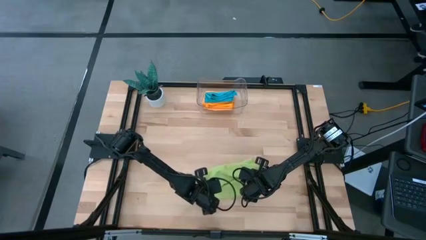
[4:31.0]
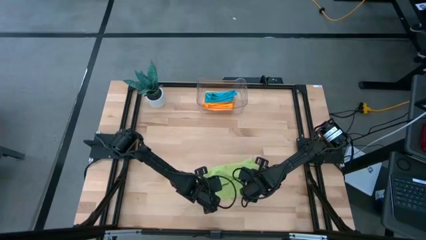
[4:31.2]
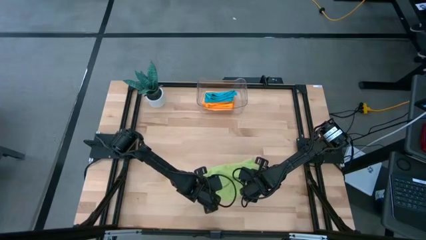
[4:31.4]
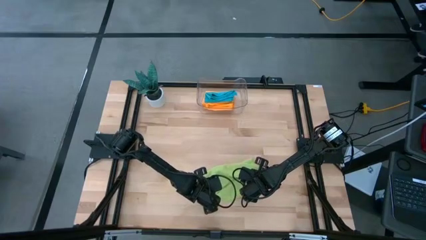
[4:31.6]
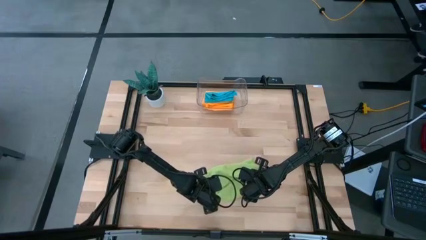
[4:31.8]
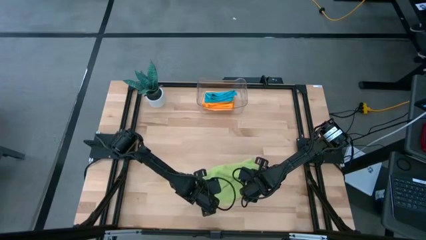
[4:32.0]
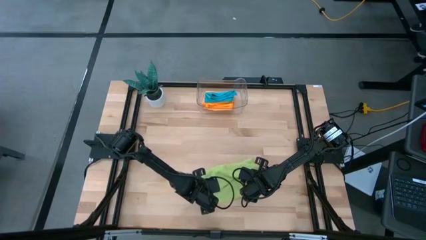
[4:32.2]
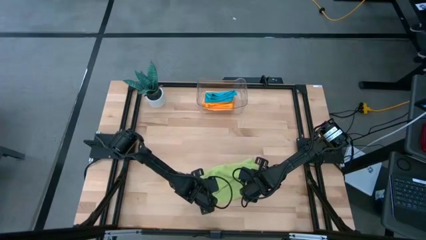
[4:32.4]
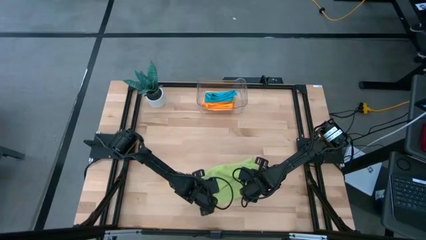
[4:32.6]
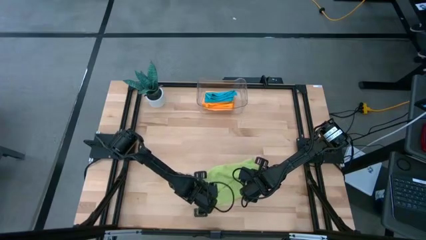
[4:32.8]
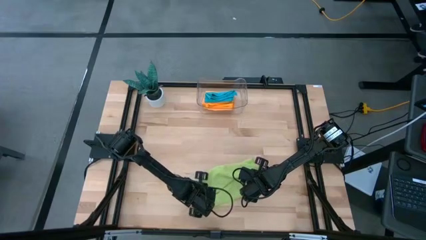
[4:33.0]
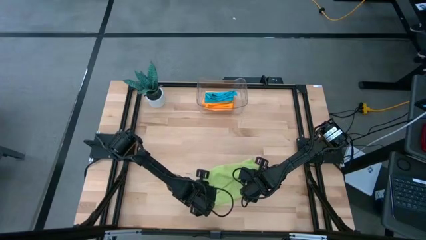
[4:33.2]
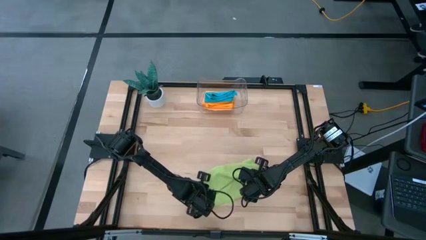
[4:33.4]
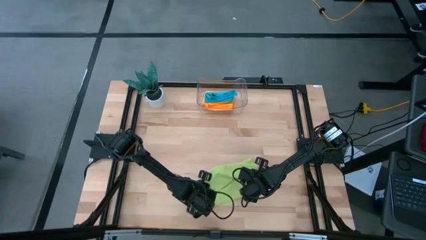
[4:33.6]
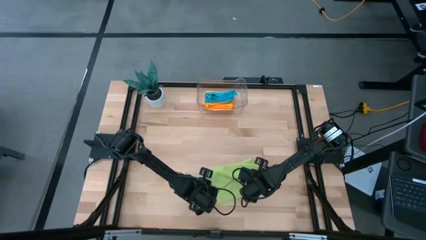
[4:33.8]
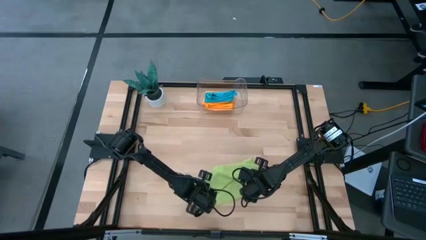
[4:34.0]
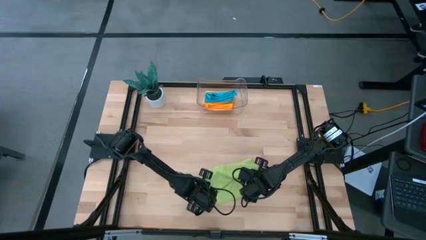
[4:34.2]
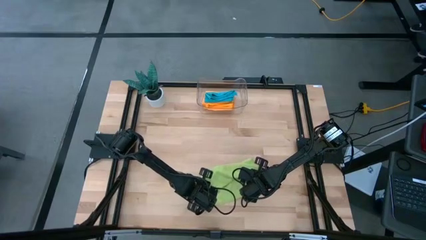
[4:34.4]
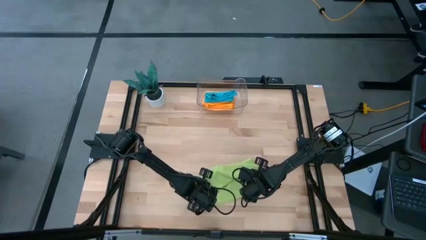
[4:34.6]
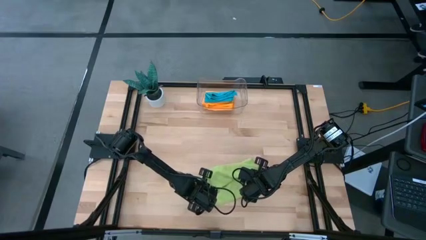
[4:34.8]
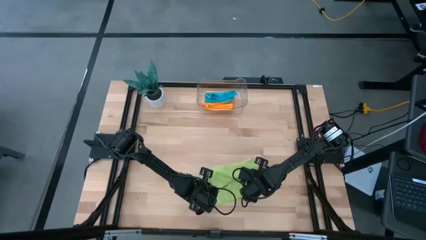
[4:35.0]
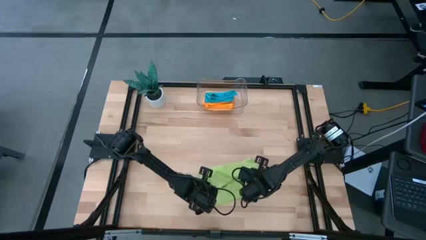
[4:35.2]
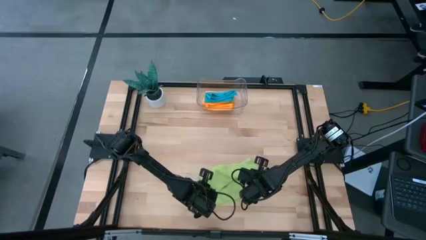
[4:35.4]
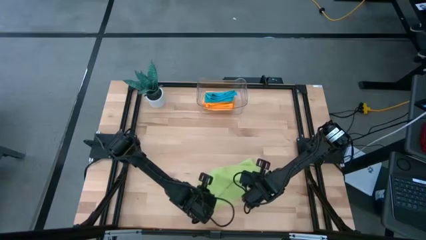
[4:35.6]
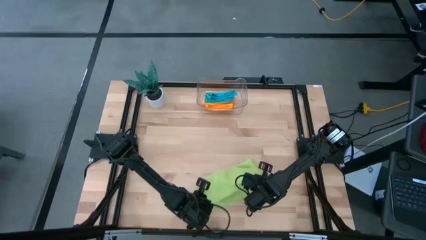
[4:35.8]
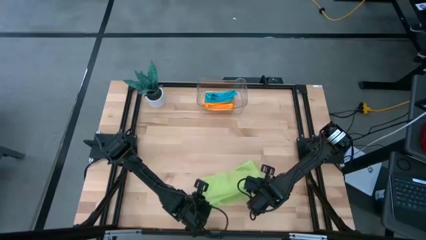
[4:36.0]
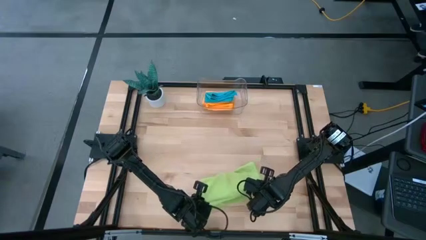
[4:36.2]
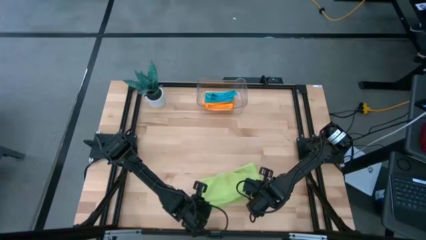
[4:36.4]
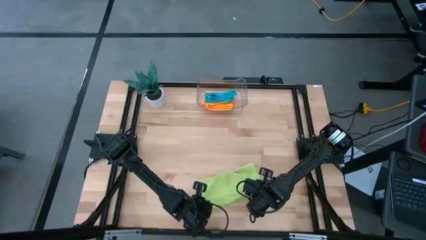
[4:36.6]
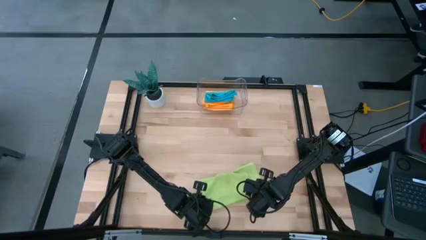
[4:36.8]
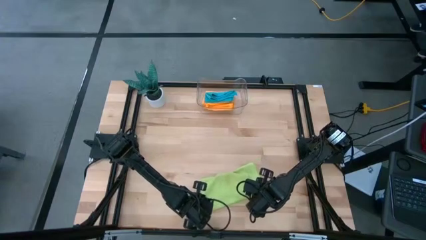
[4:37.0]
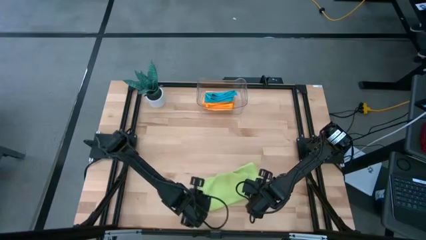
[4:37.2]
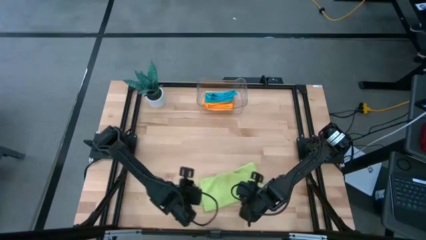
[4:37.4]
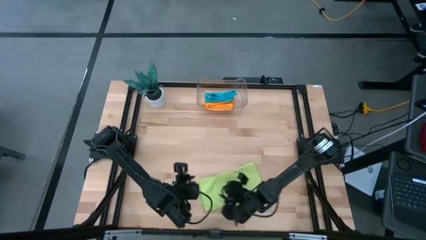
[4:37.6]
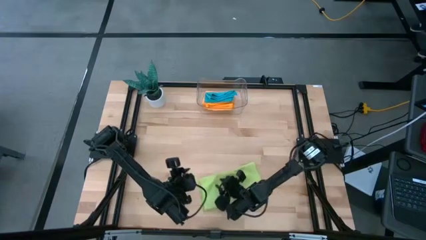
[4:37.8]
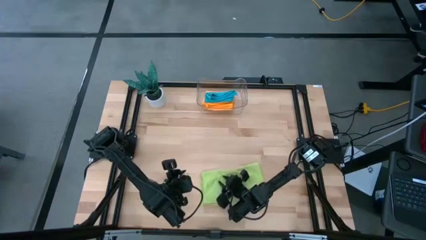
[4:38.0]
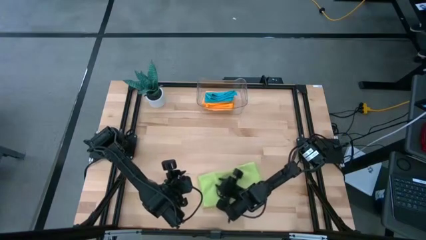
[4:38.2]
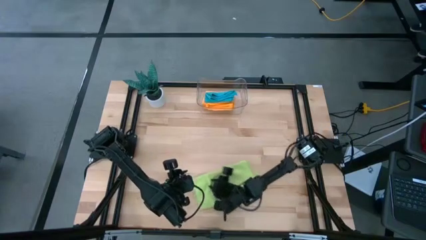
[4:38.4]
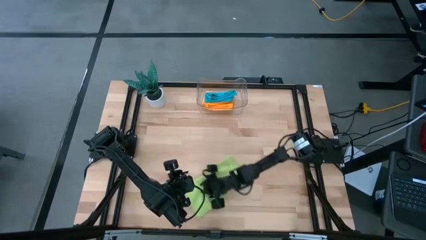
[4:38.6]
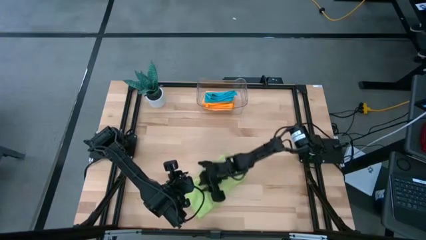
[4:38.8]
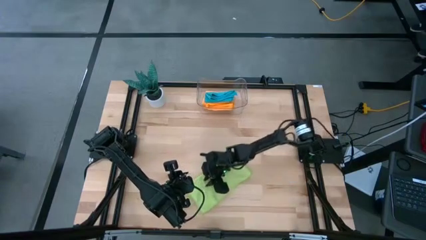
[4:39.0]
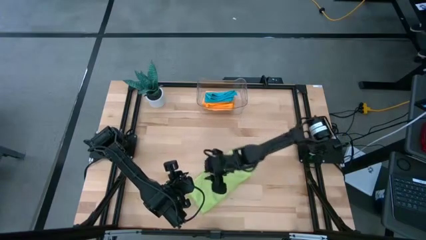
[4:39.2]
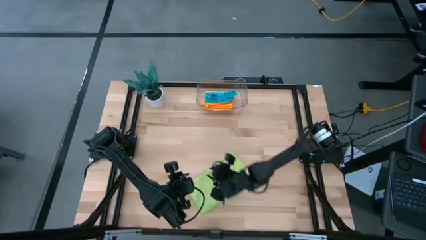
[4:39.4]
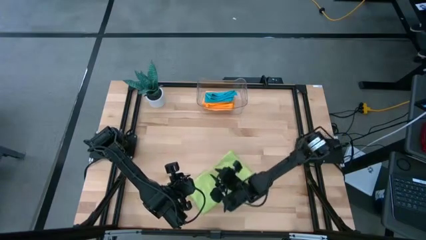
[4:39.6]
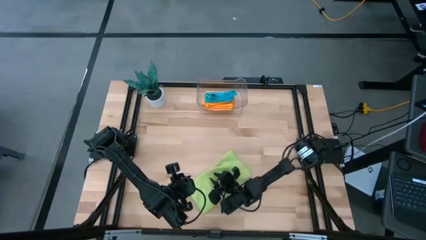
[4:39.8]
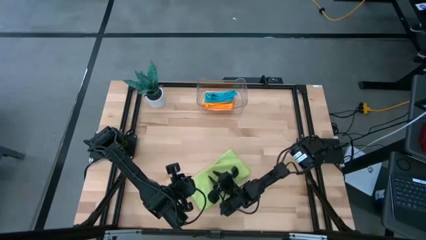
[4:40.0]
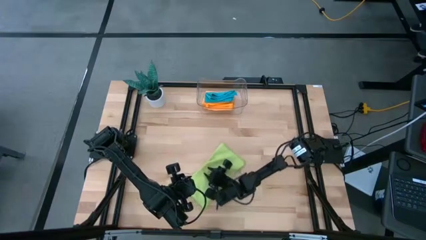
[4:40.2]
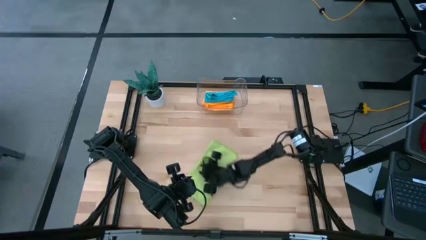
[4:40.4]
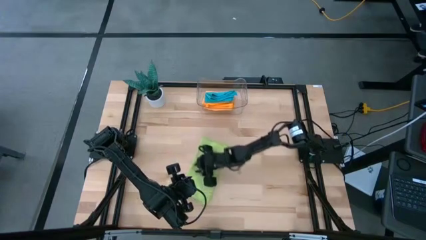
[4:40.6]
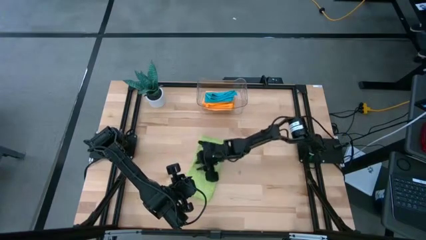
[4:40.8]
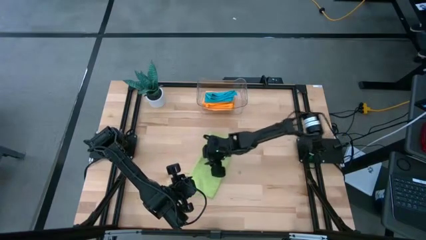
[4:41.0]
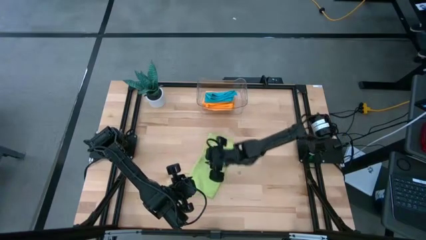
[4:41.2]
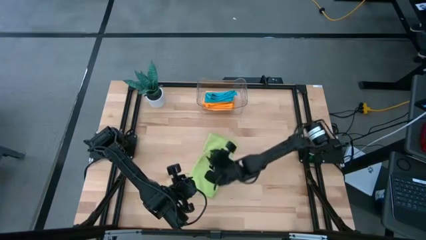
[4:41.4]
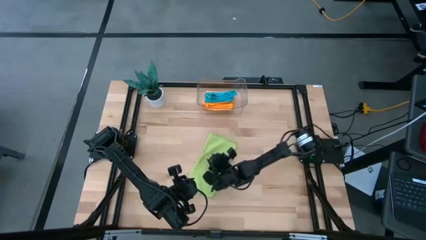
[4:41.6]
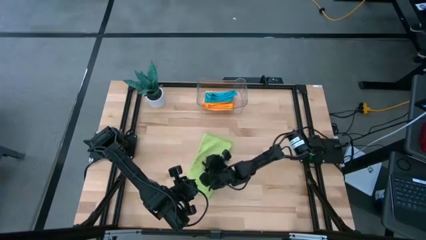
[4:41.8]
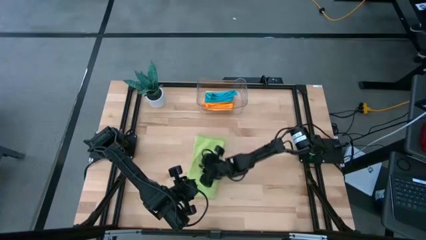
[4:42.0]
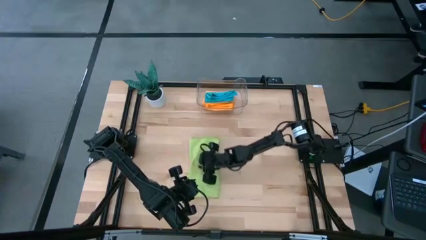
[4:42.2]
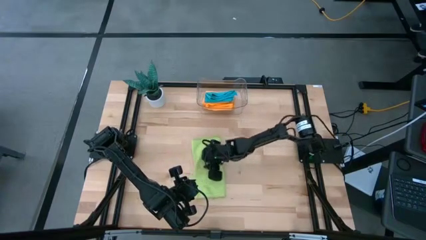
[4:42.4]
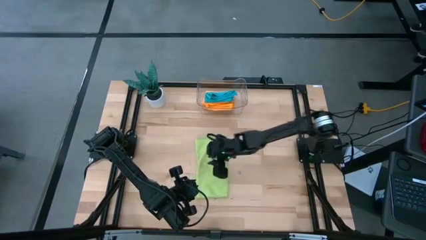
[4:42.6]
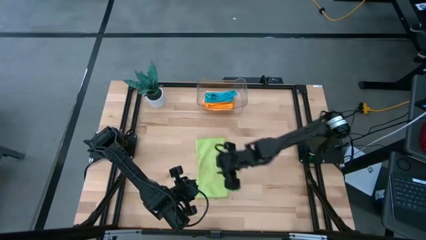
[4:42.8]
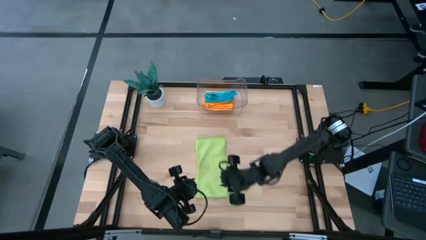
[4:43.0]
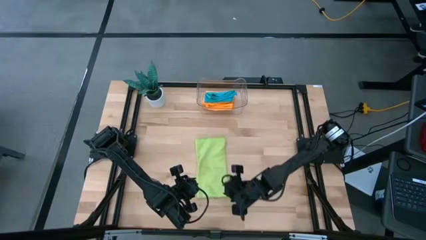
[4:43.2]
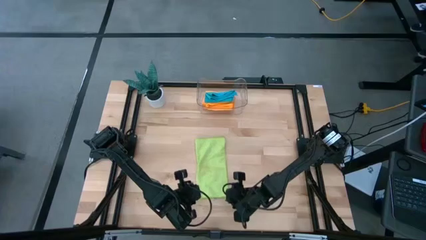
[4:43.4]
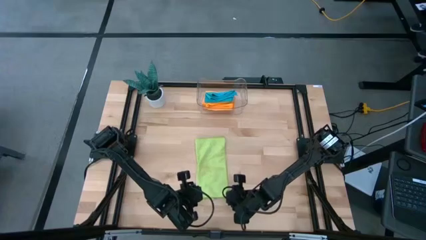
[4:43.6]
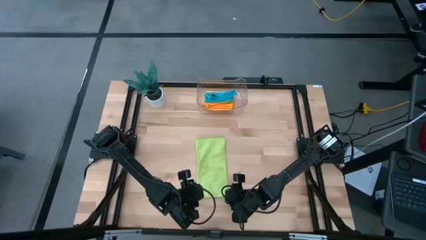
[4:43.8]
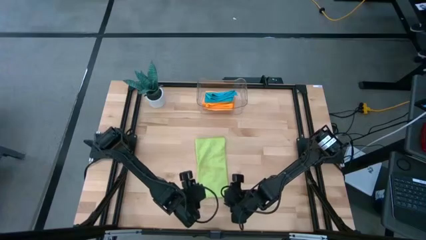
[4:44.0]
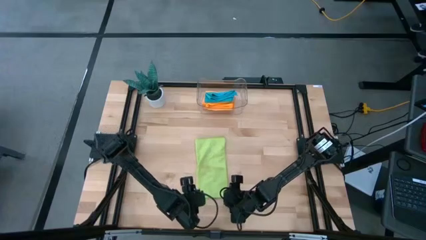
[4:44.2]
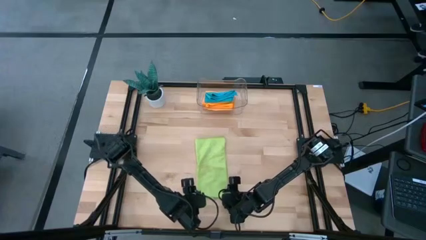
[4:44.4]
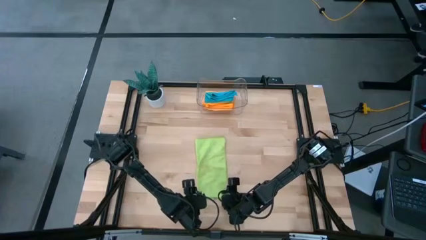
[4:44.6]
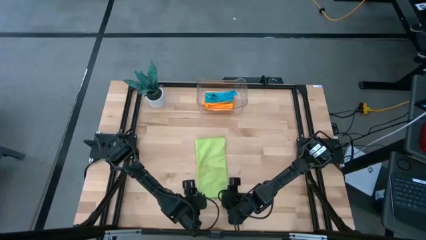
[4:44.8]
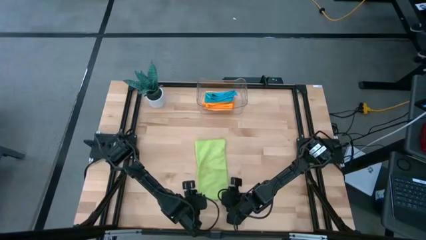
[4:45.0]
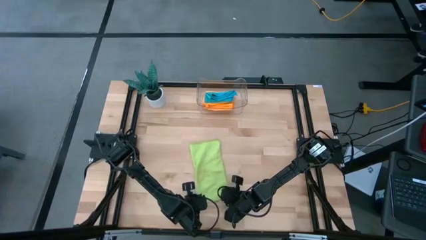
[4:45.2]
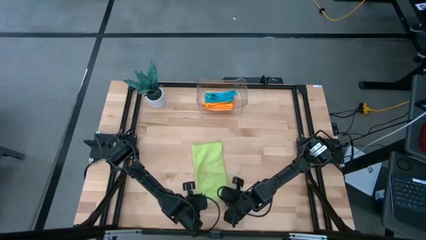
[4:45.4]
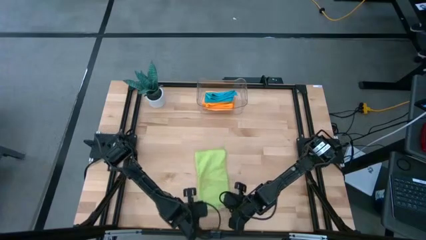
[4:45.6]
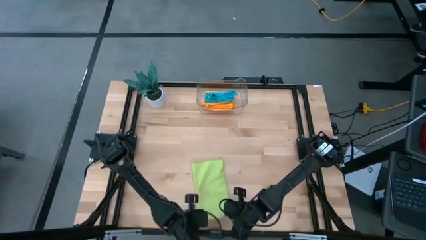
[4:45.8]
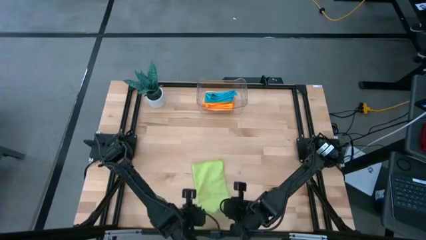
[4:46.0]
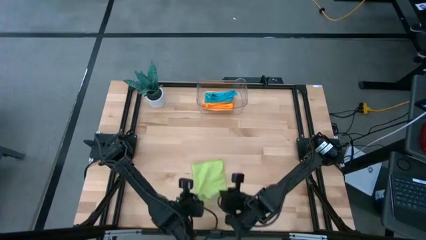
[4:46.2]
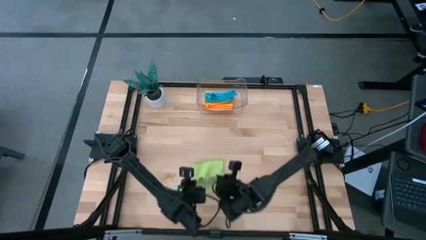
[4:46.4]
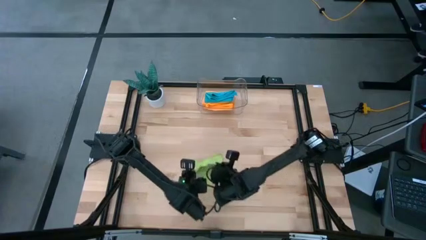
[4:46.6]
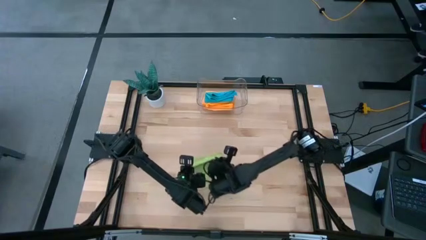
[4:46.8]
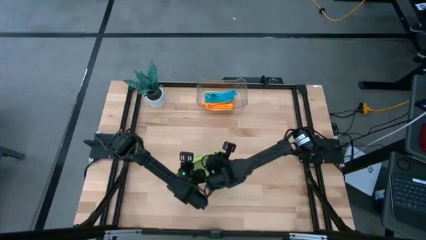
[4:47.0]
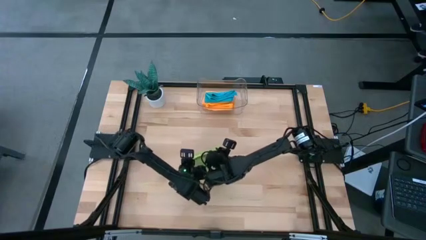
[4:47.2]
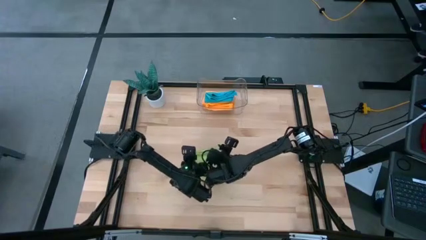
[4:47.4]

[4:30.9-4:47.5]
Task: Fold microfiber towels
Fold the green microfiber cloth
